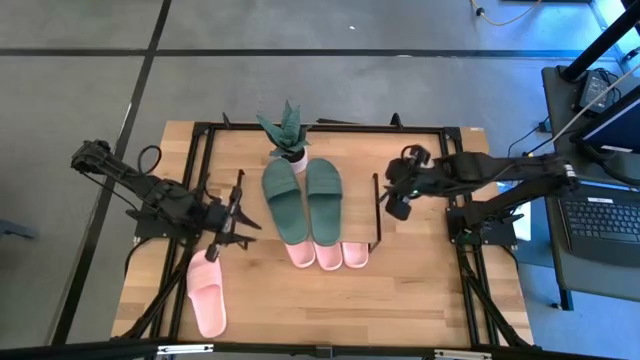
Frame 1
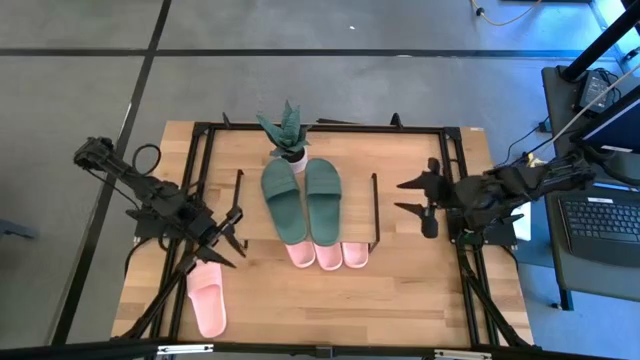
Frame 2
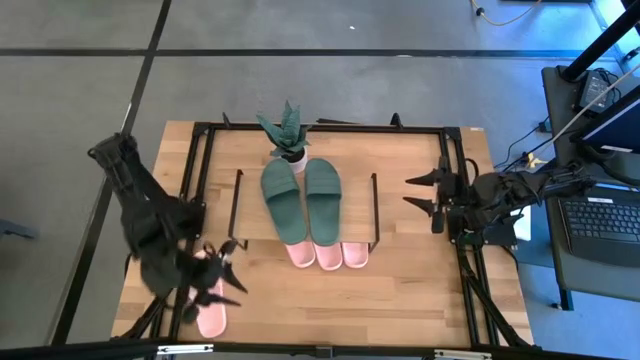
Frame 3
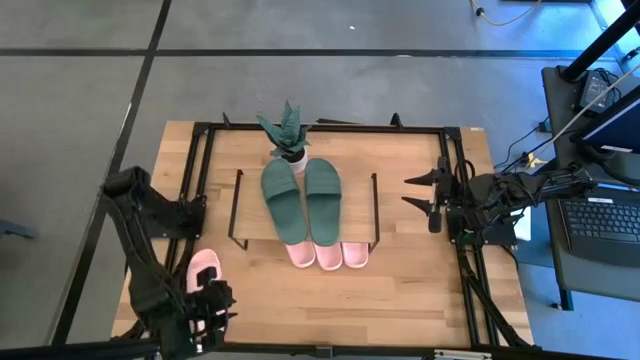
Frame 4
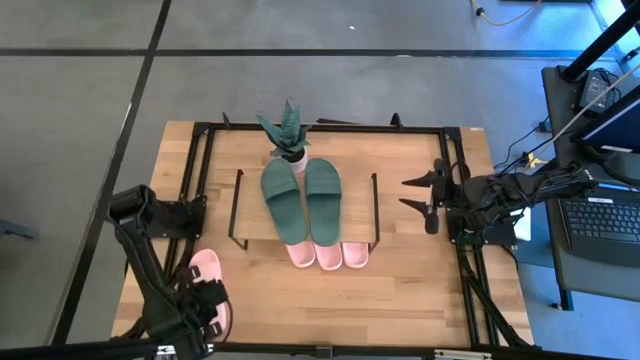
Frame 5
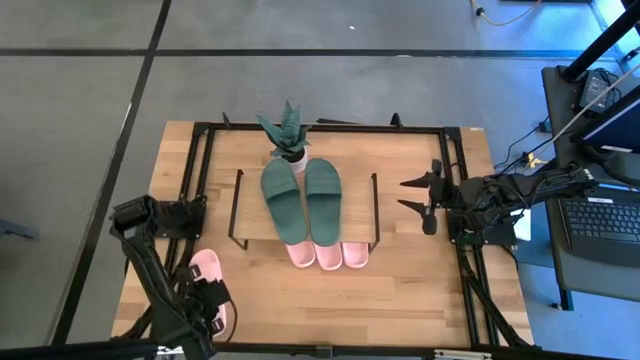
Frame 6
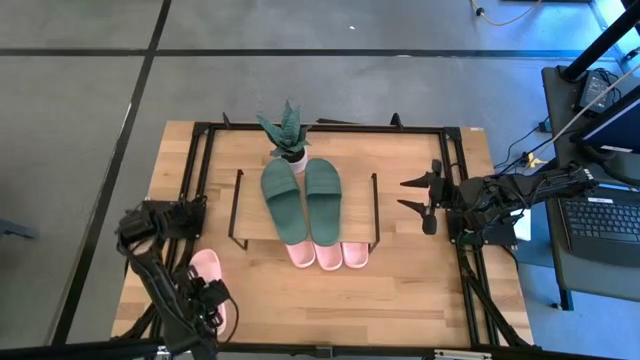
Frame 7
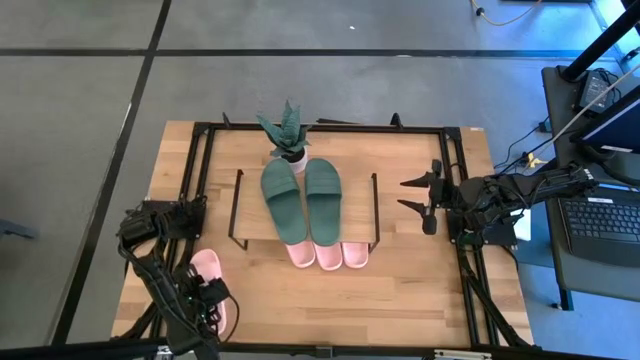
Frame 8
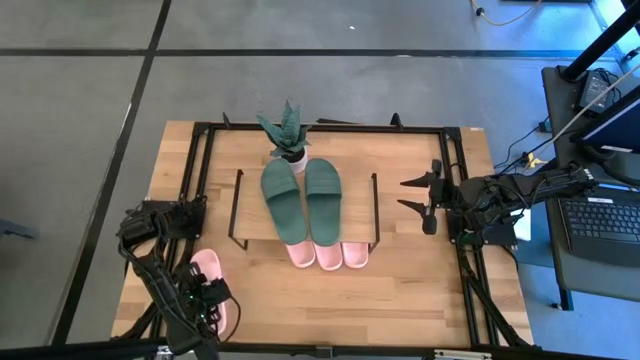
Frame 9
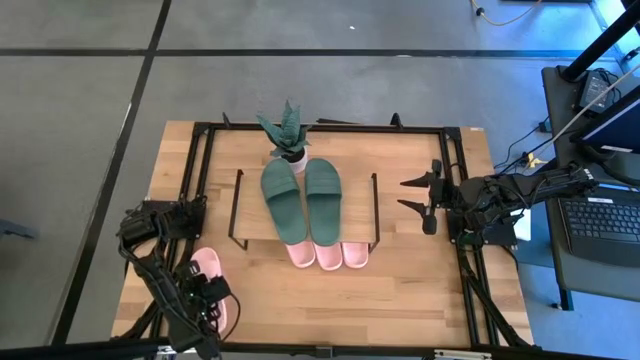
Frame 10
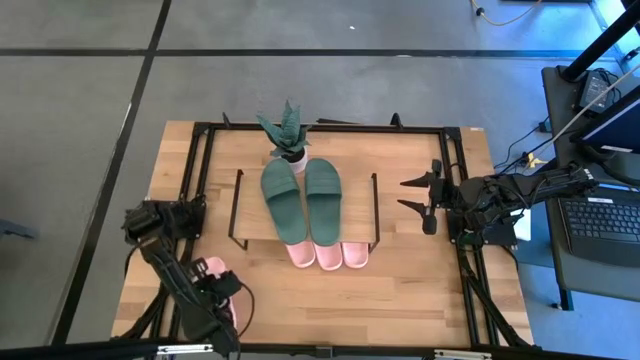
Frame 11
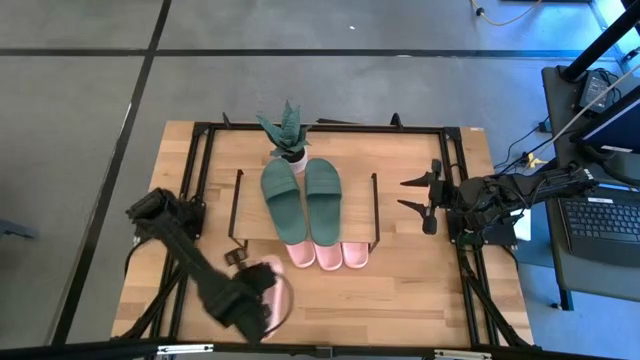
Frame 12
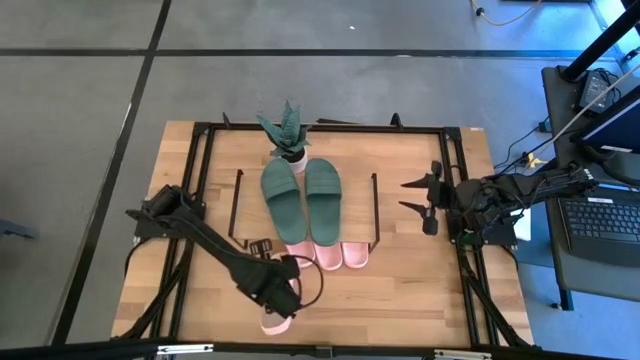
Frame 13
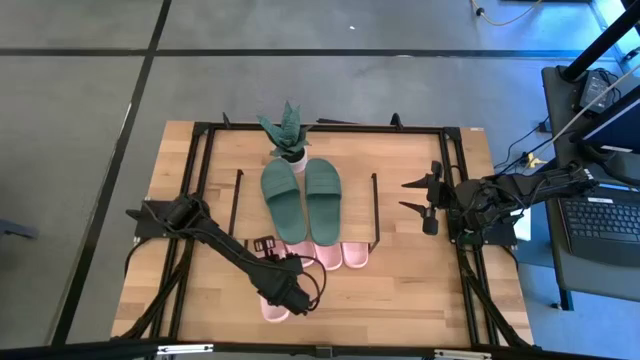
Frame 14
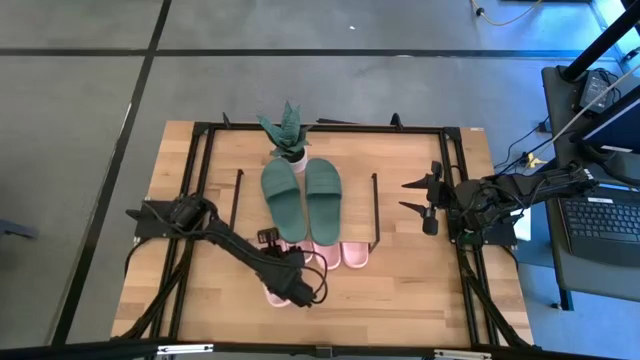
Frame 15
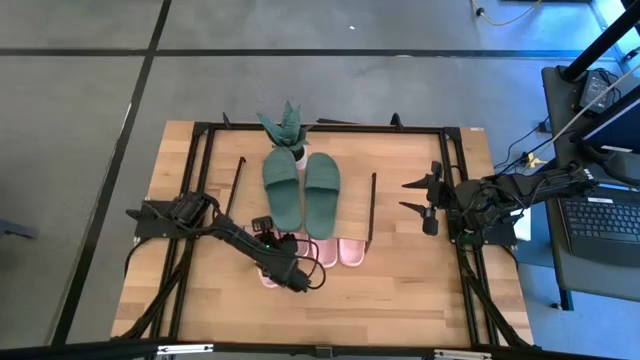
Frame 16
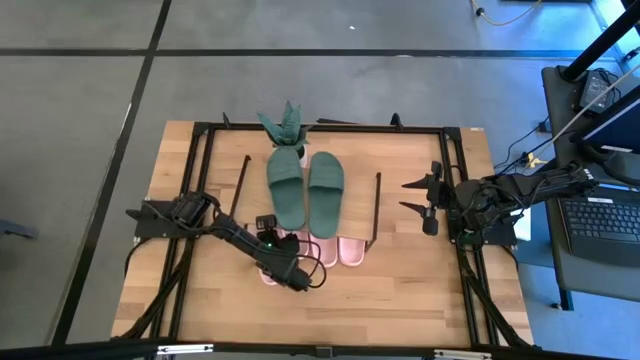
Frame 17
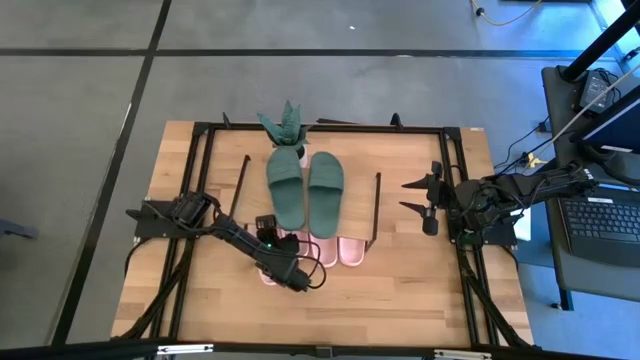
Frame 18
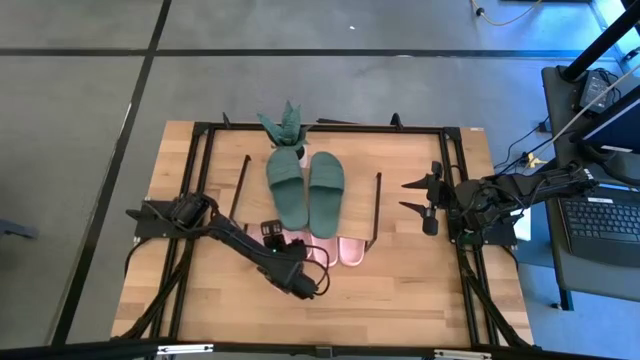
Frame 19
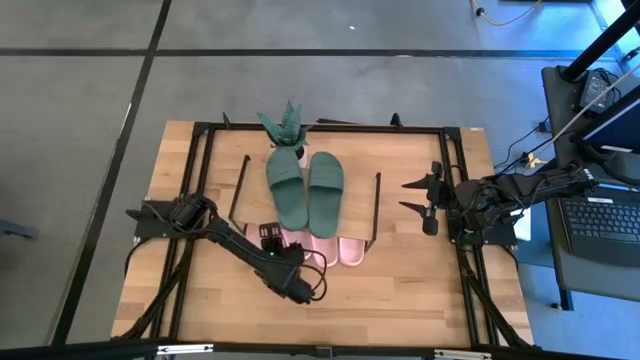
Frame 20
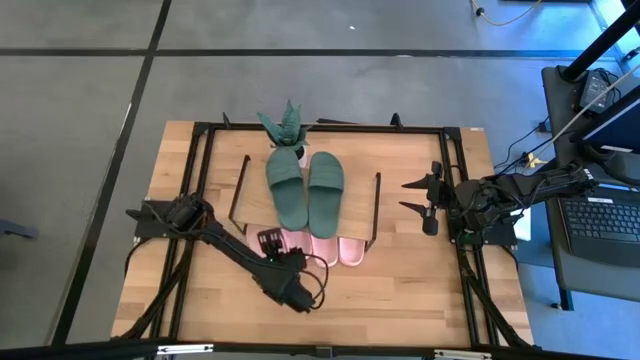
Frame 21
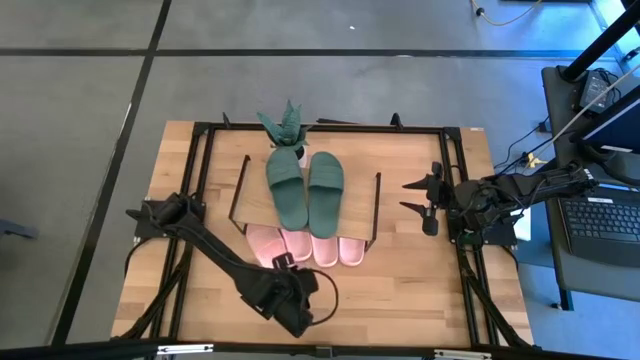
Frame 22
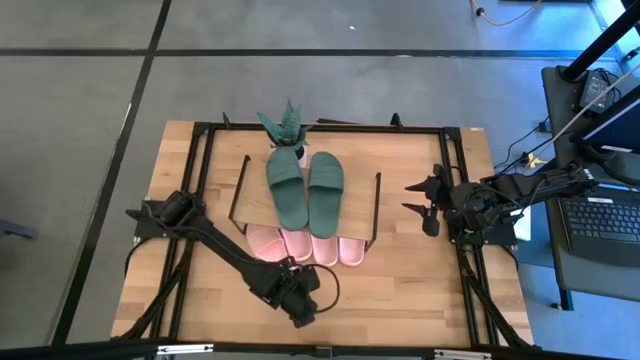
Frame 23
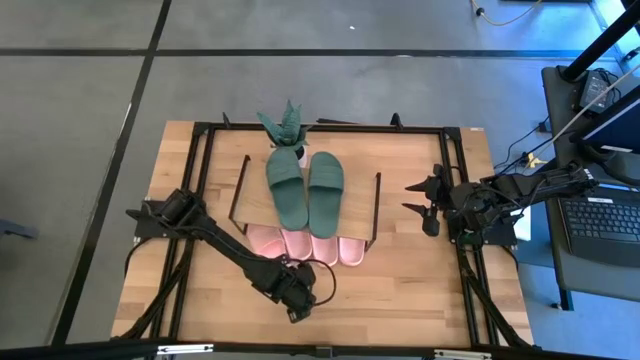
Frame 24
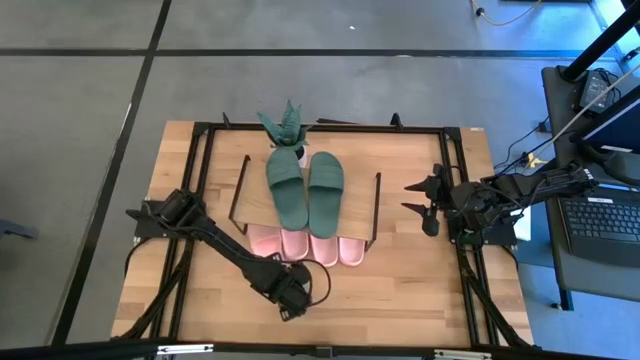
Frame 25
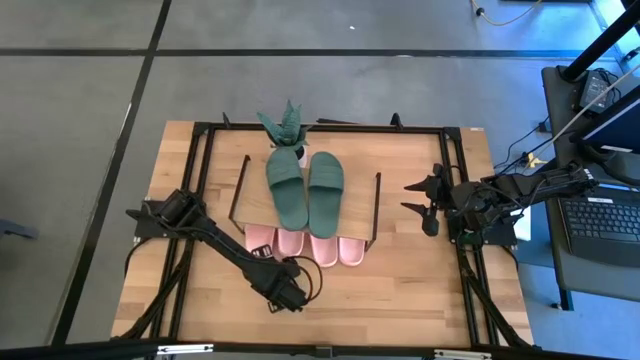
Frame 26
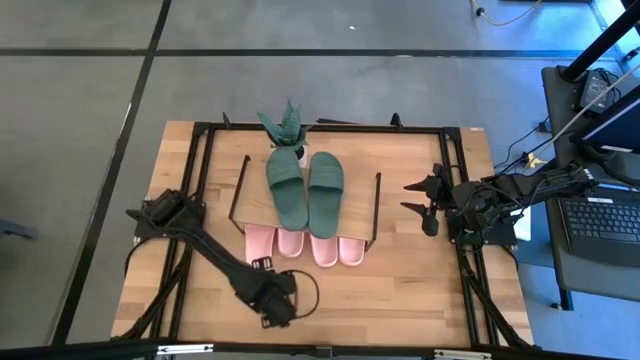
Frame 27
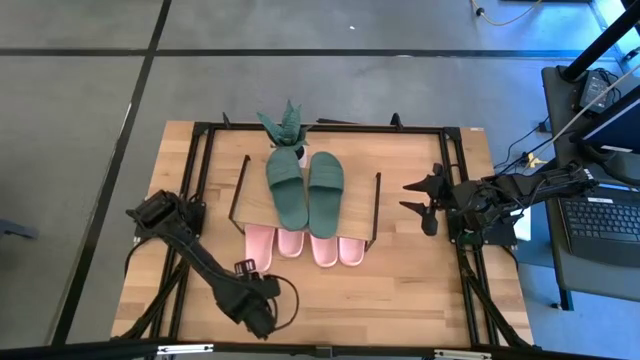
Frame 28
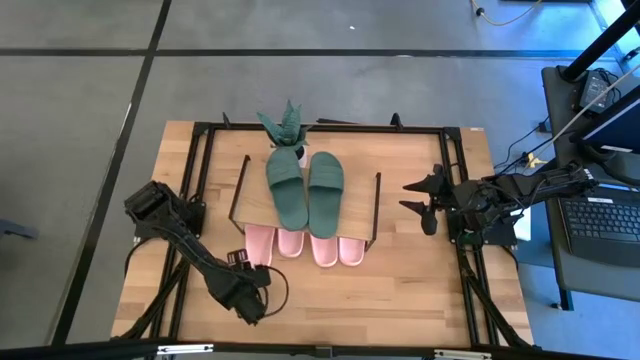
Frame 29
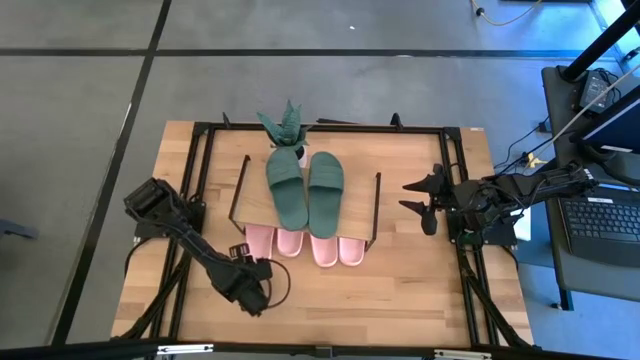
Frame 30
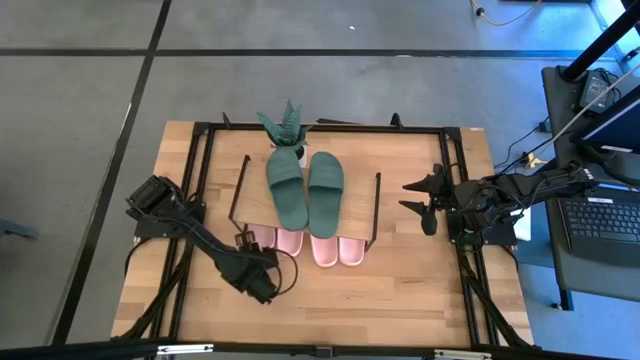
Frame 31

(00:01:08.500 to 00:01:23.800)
Task: Pick and place slides into the shelf
Put the pink slide under the shelf

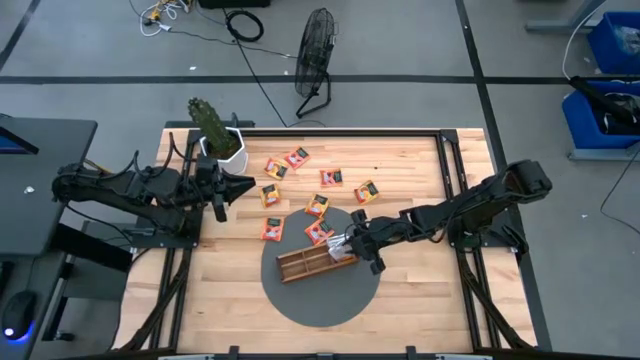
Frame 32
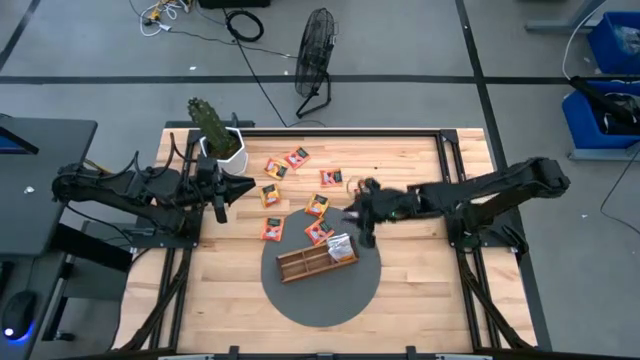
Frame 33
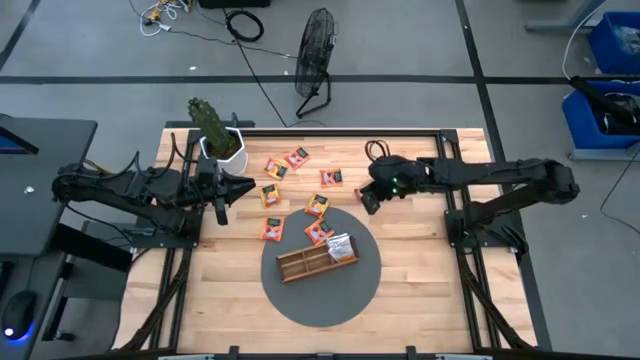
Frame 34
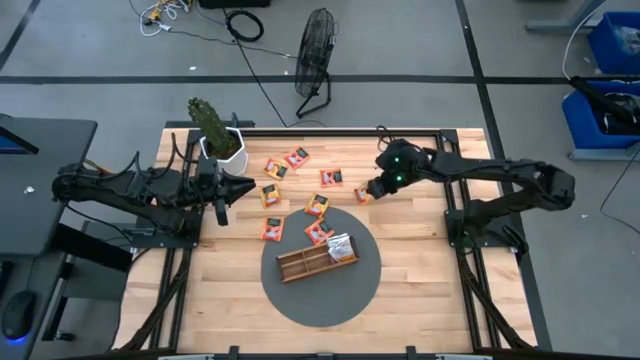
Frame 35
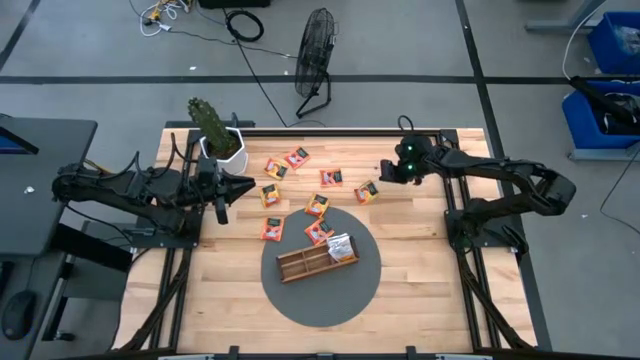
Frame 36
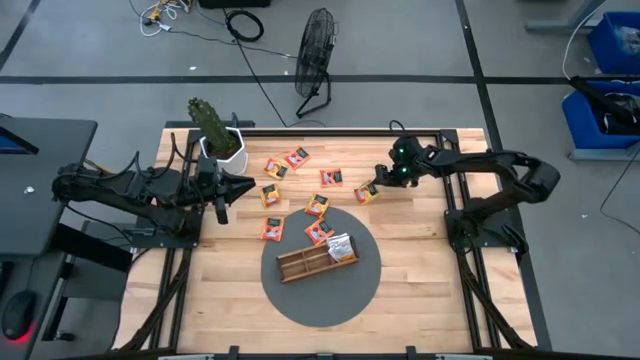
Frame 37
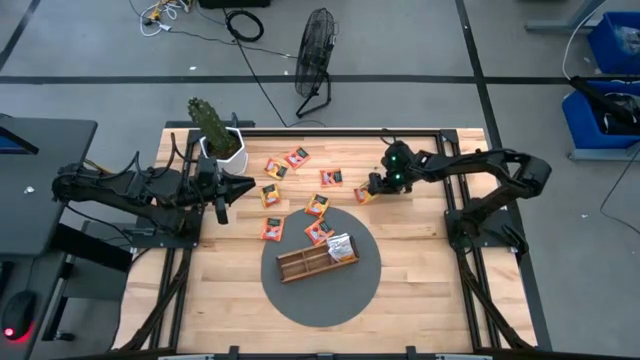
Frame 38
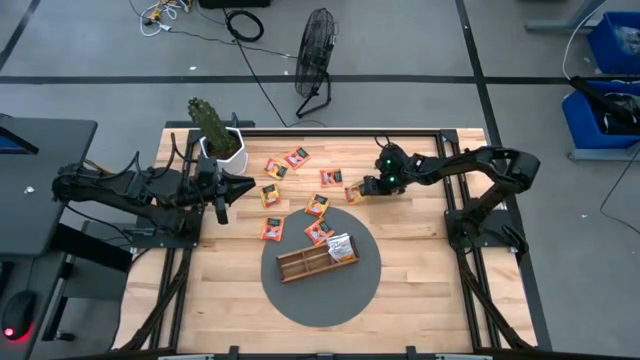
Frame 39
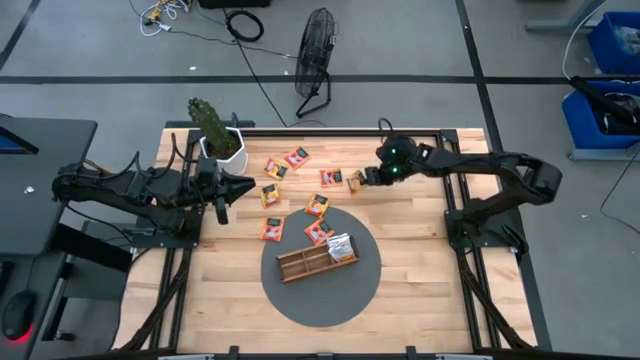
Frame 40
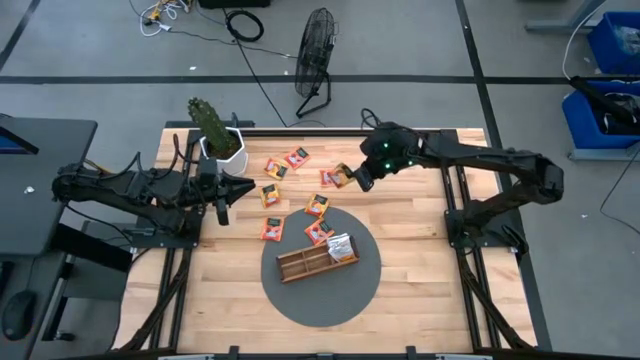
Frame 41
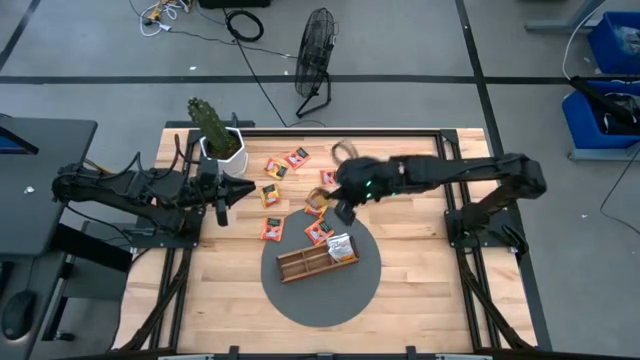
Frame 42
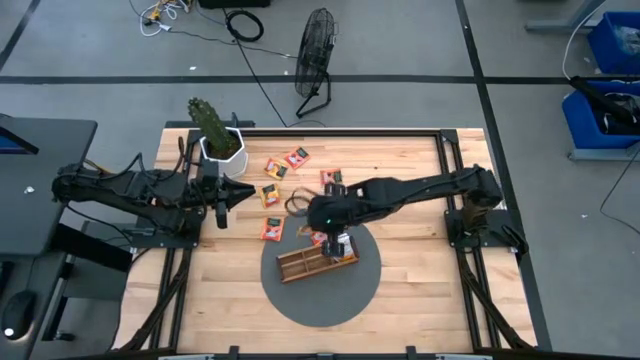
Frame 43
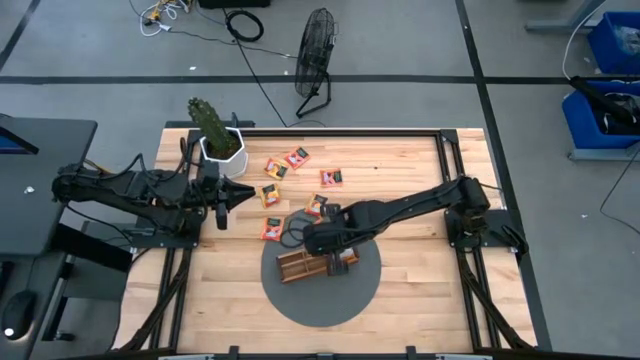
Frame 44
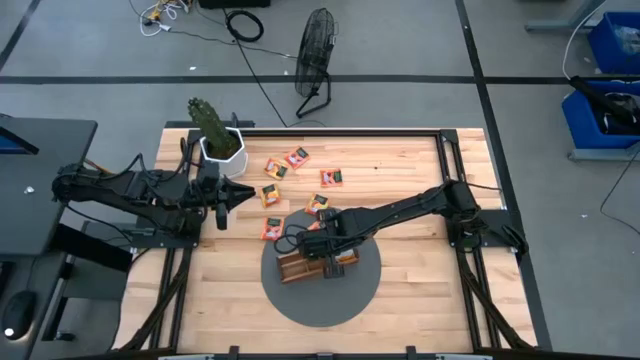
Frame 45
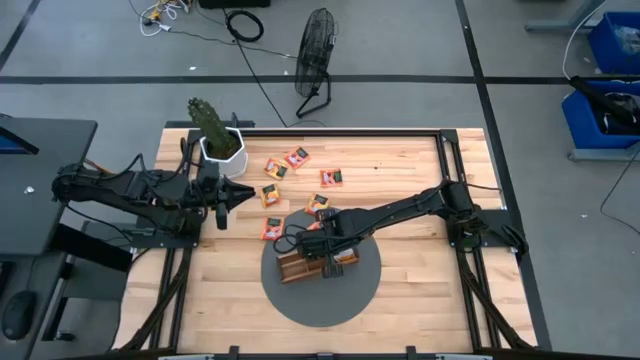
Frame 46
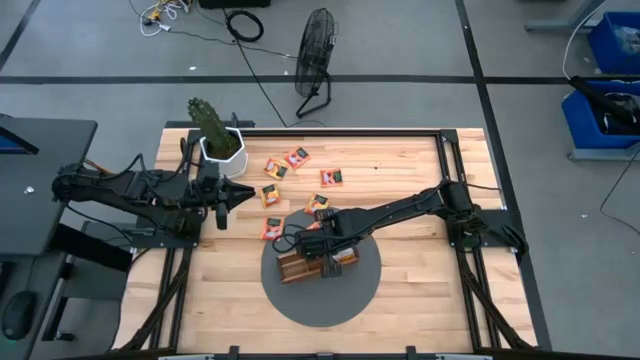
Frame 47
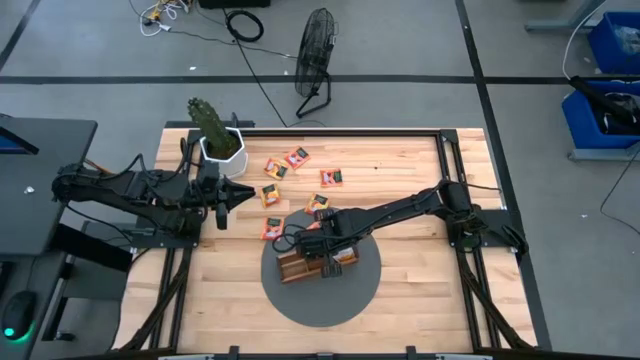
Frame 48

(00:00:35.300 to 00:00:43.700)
Task: Pick & Place Tea
Put the yellow tea bag into the middle section of the wooden organizer
